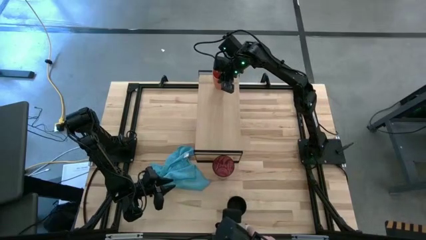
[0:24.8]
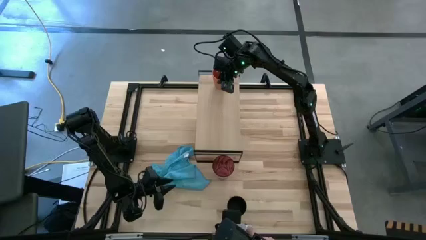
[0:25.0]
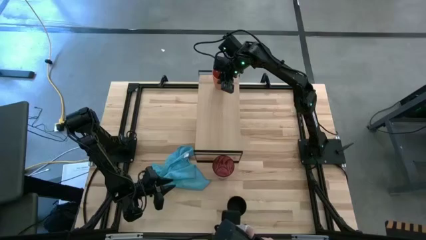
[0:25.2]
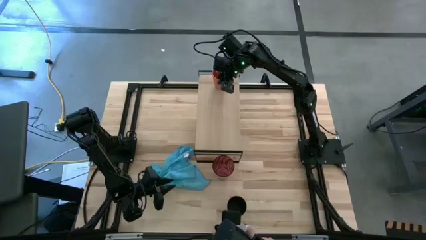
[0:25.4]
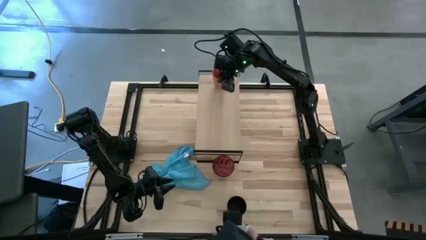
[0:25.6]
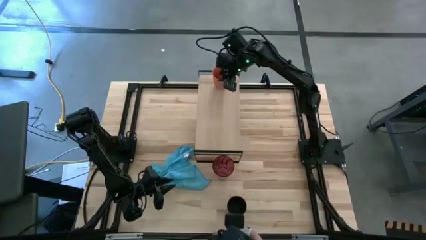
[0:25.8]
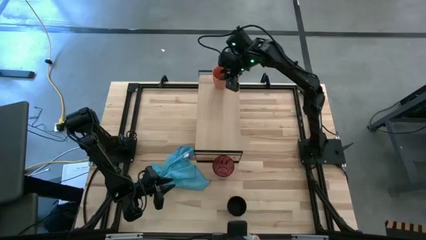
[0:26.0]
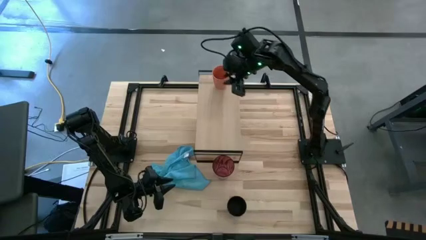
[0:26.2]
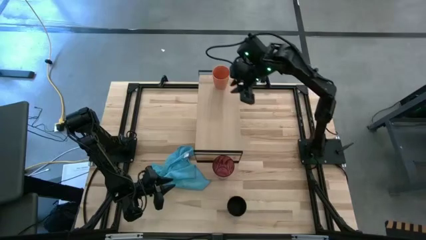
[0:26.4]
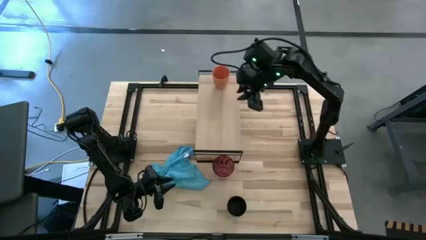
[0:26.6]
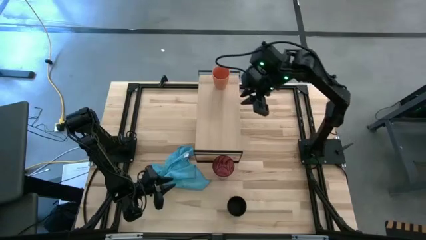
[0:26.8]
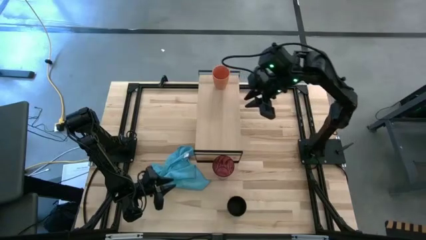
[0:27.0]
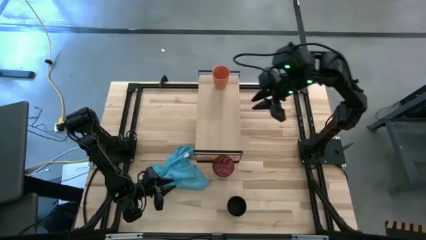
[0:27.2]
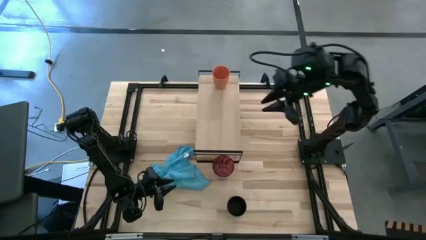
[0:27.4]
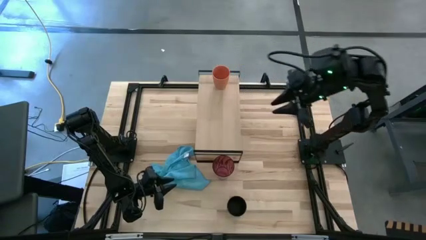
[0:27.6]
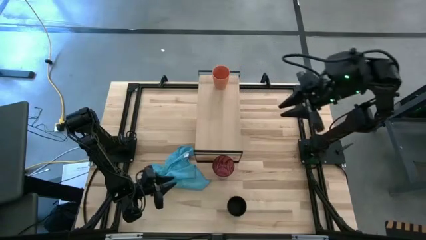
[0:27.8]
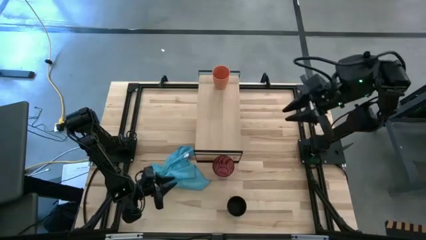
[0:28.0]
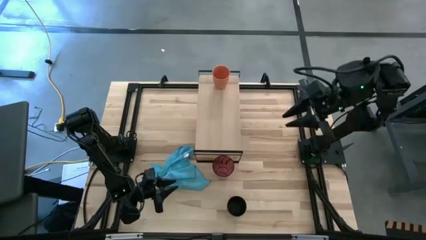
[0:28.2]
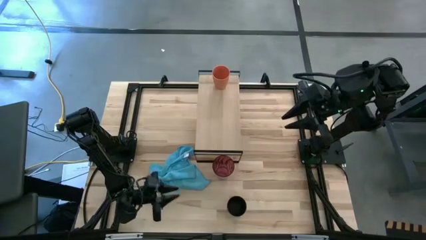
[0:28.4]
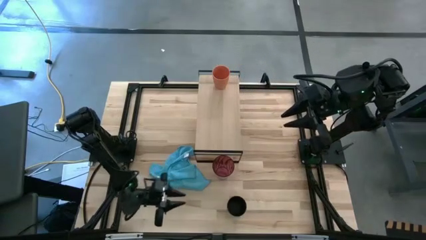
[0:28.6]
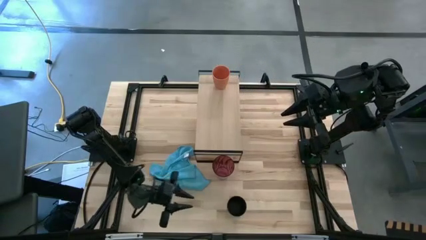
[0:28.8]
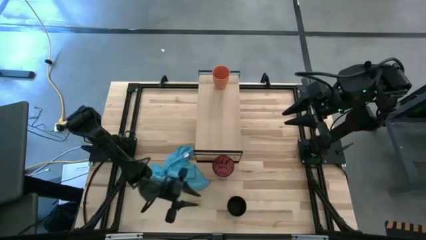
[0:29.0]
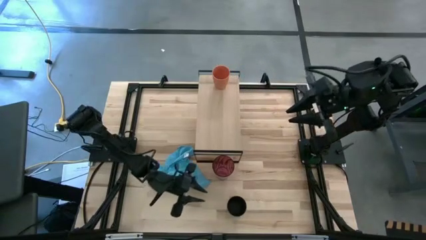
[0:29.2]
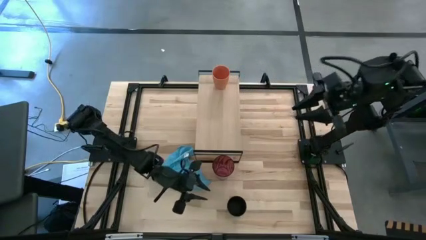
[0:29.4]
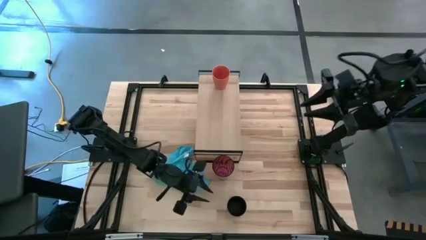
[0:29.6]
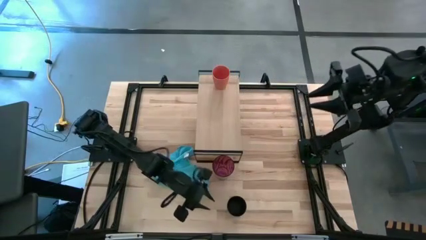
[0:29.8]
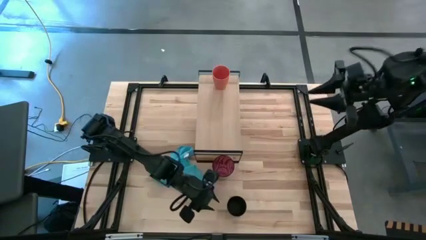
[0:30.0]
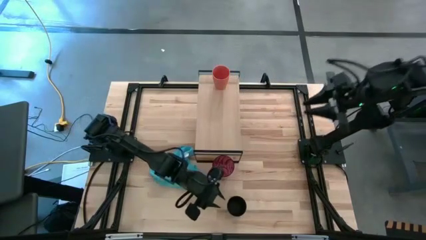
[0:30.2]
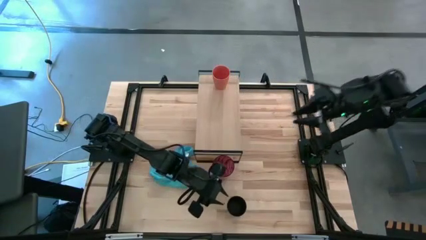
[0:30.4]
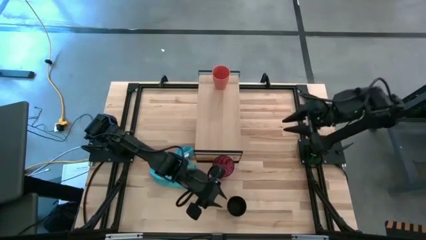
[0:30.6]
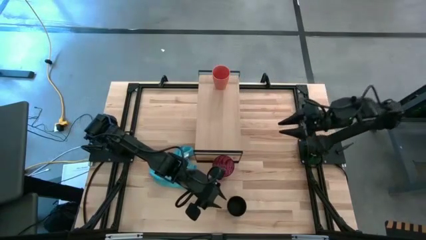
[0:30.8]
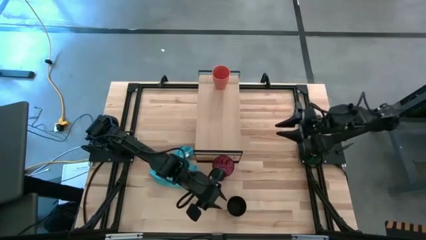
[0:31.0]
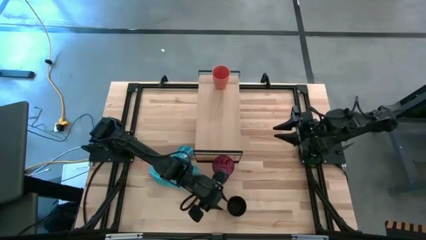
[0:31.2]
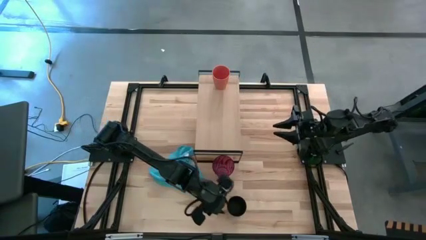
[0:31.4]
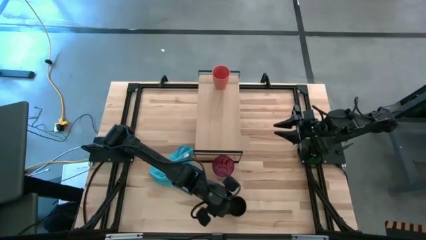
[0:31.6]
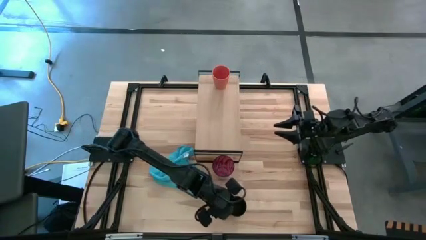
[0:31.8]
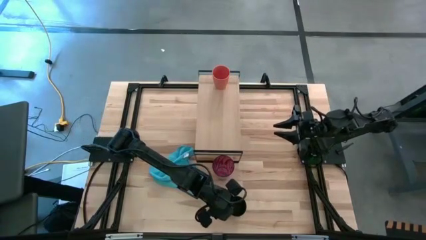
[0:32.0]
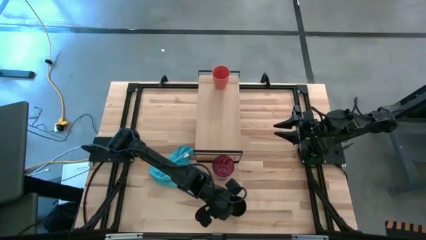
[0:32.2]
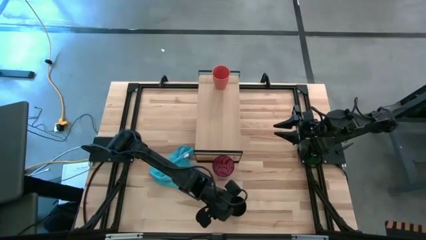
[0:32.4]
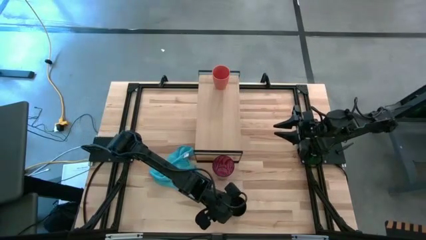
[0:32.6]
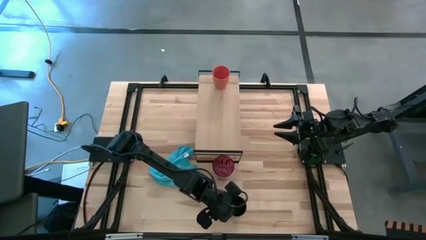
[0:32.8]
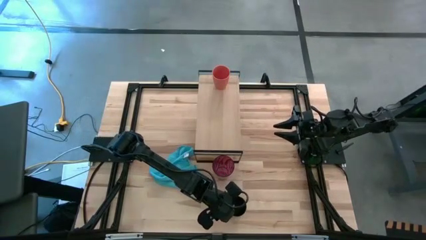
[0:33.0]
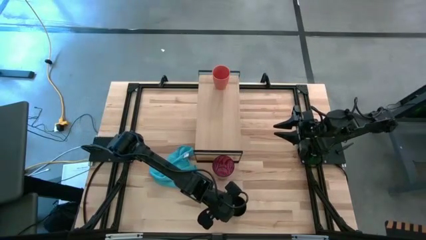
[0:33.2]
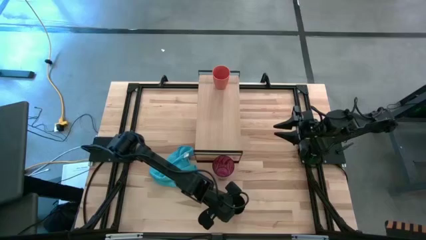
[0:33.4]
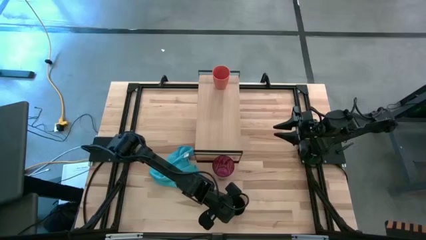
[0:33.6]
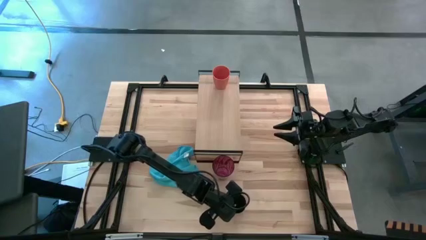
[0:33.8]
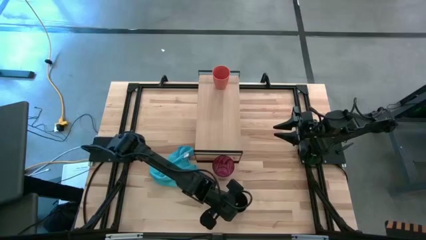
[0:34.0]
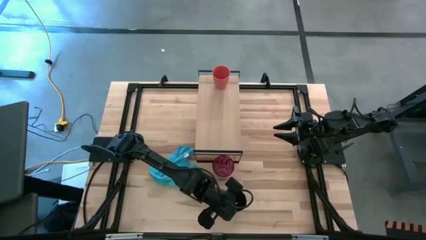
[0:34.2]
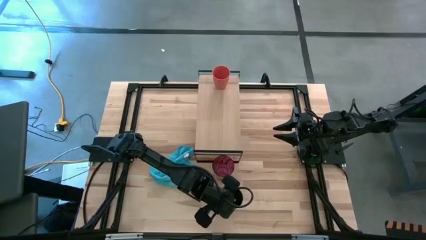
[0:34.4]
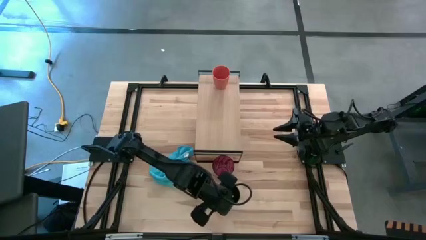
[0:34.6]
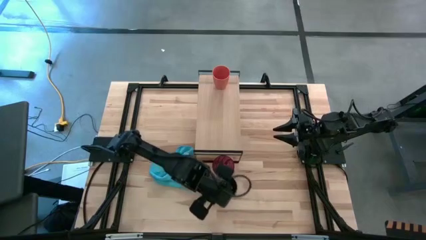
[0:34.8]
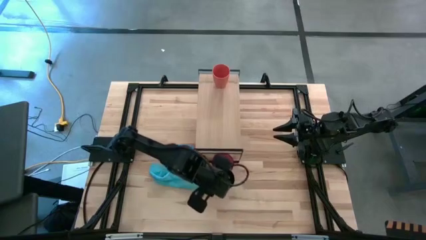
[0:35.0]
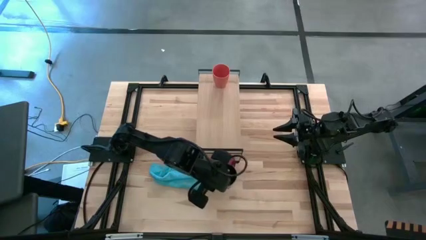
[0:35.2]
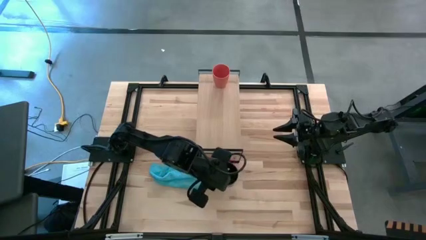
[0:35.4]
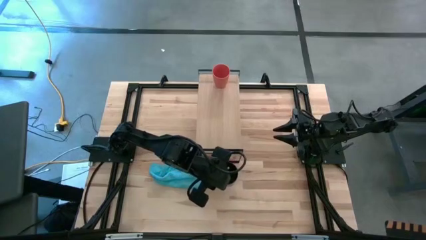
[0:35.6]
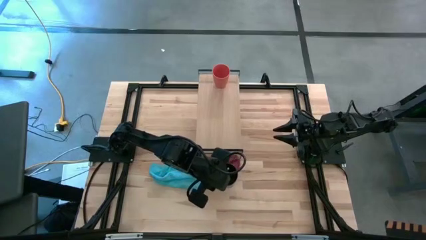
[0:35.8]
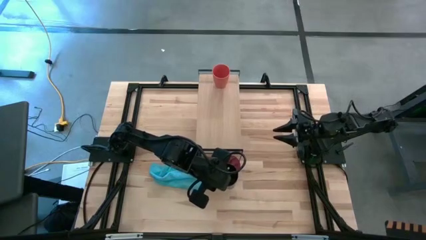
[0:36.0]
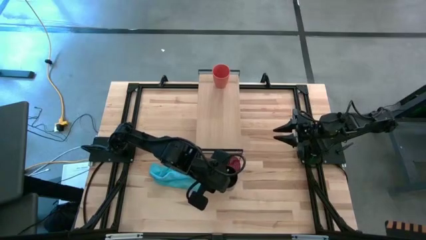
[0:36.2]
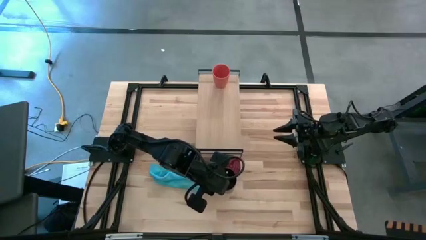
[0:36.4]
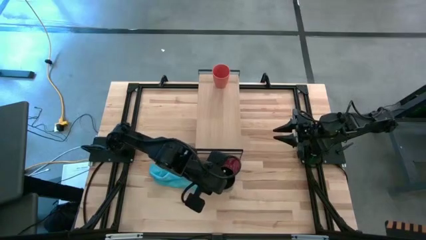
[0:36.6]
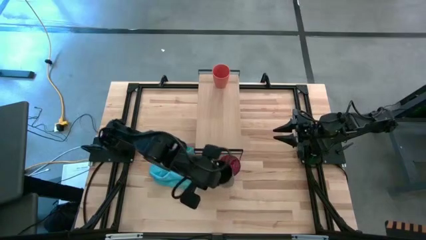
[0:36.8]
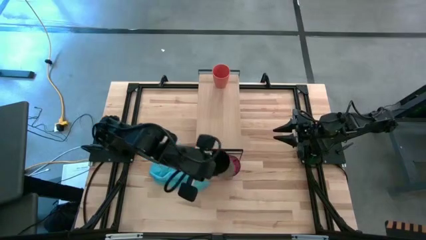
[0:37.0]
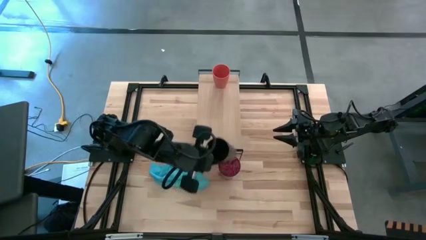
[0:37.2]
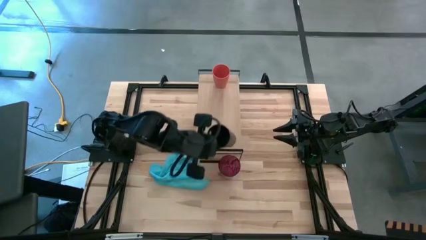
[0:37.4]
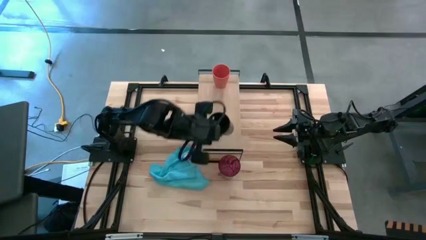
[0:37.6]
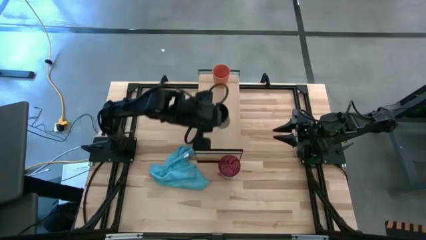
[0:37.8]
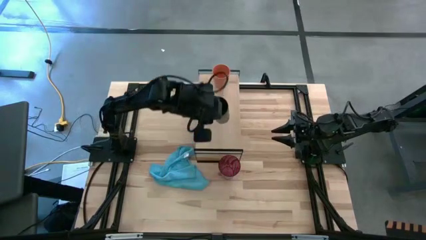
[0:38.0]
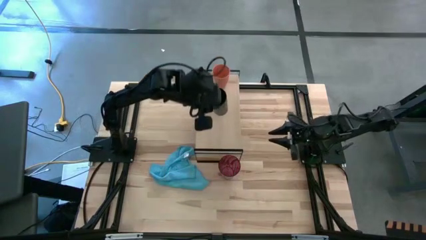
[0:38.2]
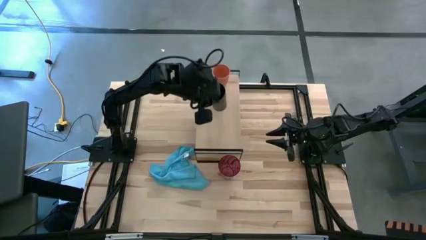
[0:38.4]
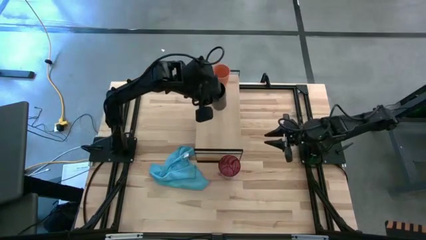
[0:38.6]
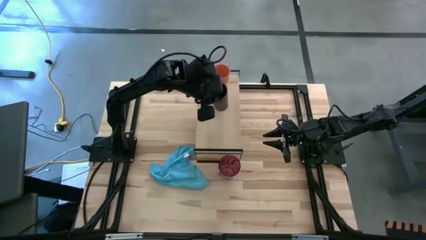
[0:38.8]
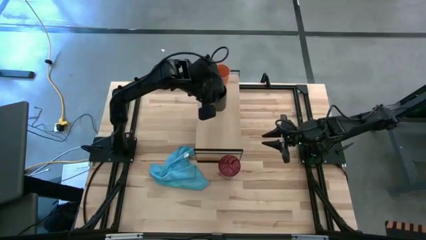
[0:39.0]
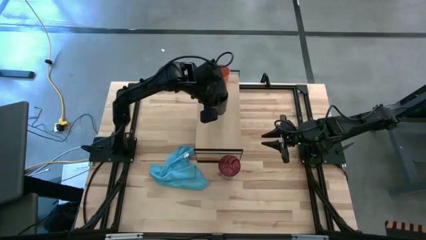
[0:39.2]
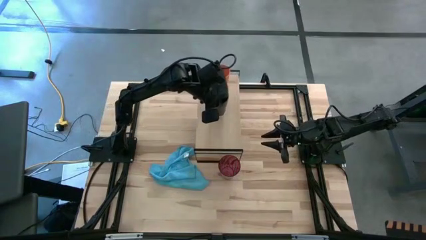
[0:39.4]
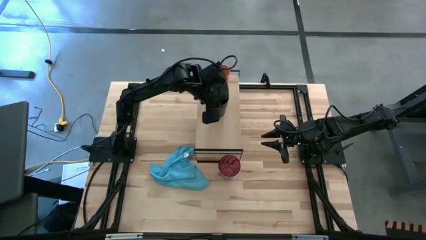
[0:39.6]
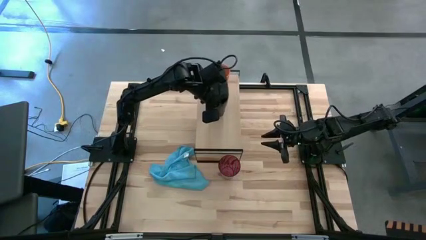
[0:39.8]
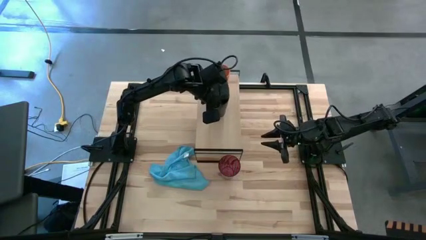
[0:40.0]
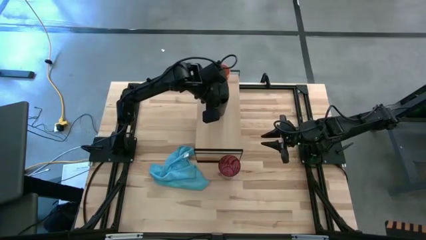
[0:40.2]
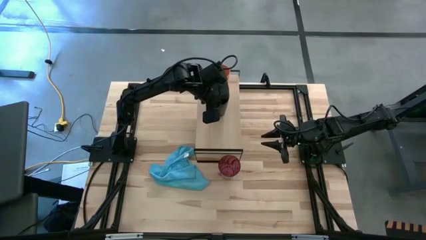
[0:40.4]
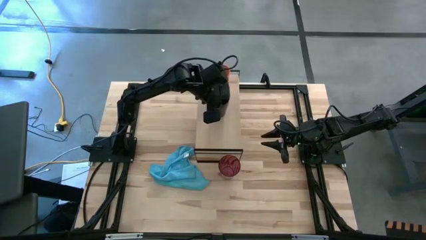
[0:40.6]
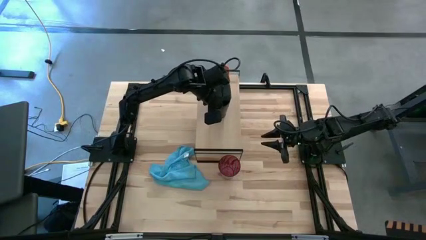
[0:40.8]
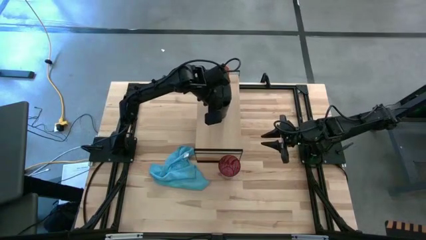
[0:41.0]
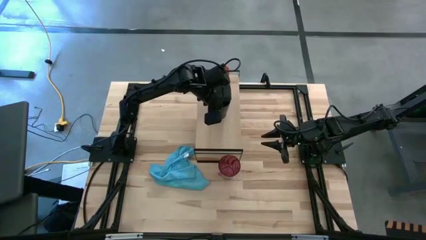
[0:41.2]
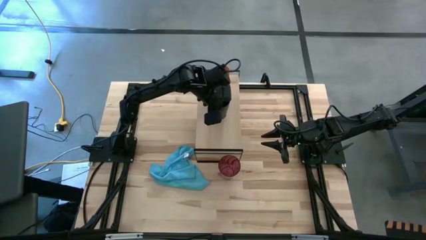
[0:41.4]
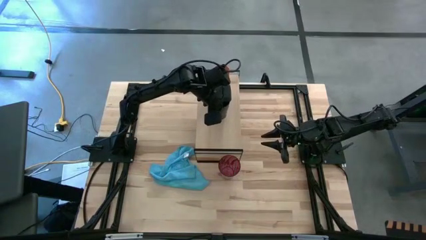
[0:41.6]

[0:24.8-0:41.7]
Task: Stack small to large cups/mugs on shelf
Put the black cup on the shelf
